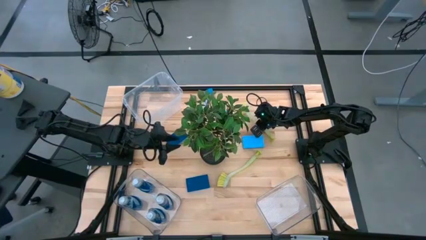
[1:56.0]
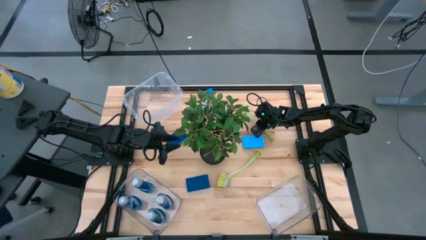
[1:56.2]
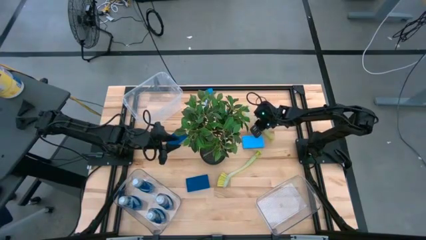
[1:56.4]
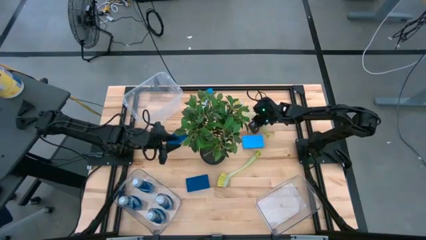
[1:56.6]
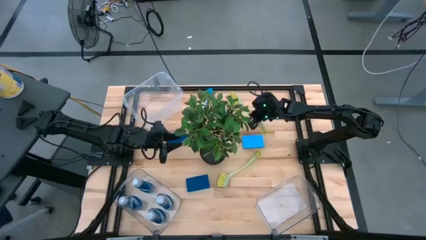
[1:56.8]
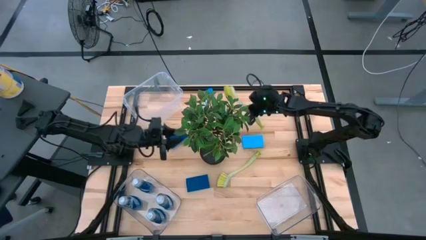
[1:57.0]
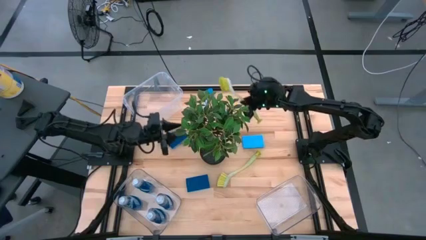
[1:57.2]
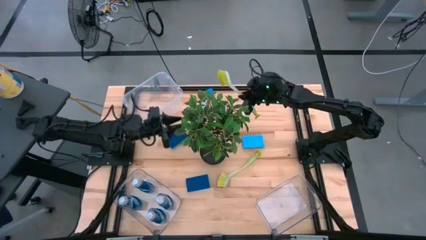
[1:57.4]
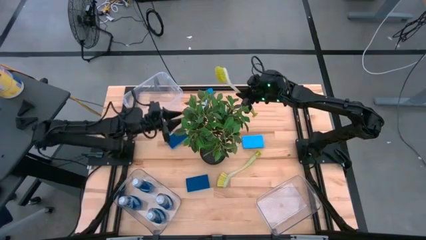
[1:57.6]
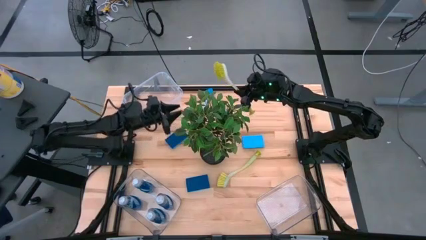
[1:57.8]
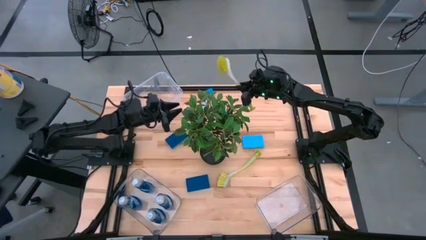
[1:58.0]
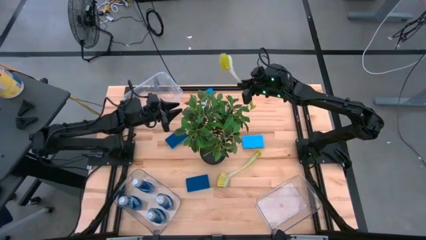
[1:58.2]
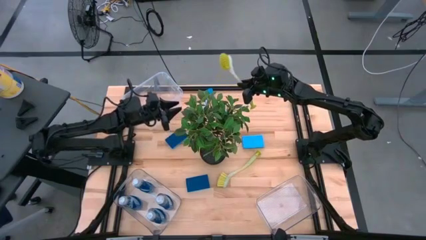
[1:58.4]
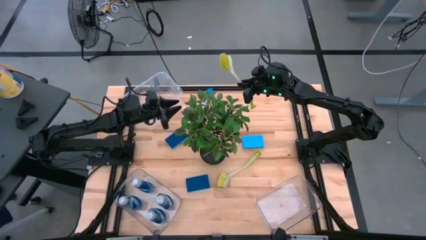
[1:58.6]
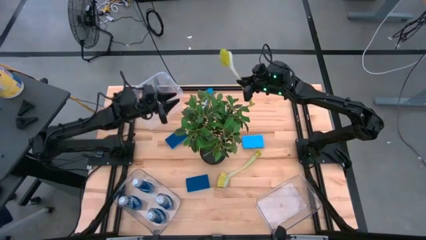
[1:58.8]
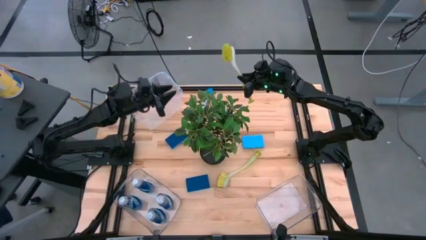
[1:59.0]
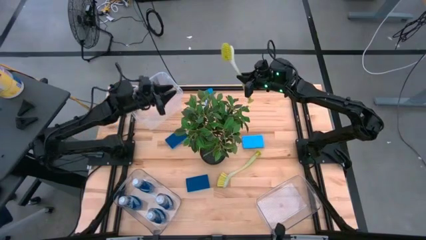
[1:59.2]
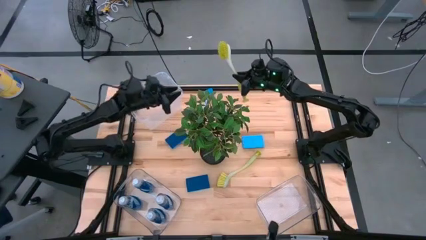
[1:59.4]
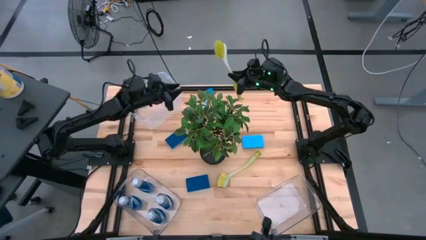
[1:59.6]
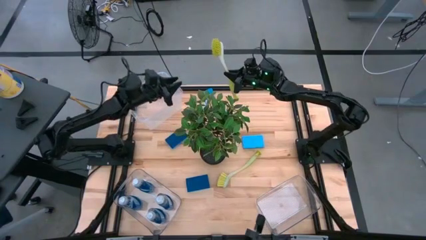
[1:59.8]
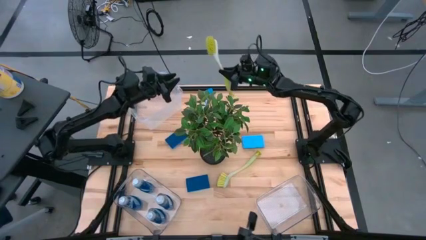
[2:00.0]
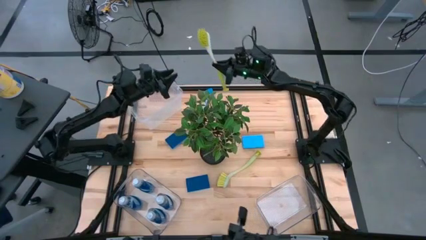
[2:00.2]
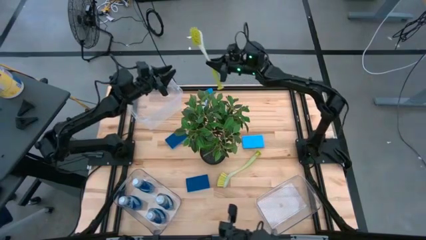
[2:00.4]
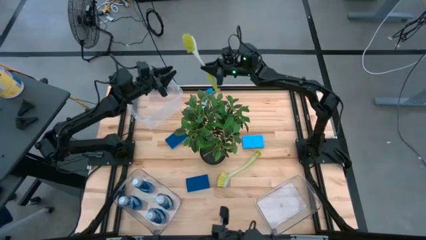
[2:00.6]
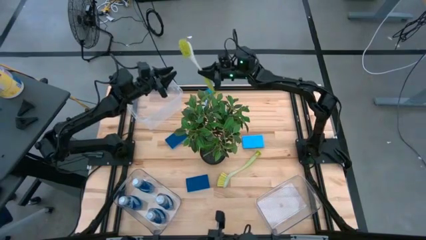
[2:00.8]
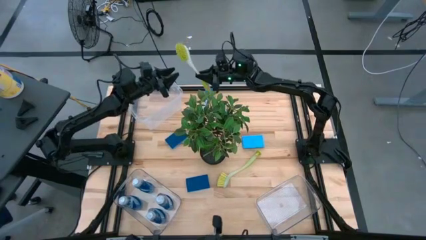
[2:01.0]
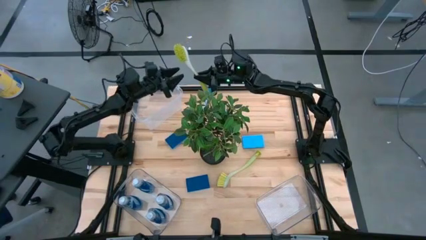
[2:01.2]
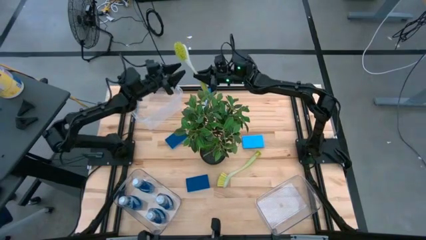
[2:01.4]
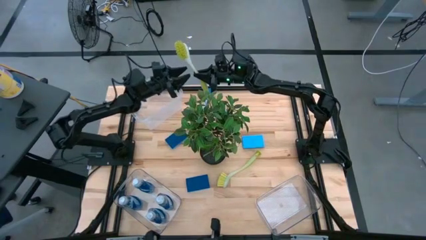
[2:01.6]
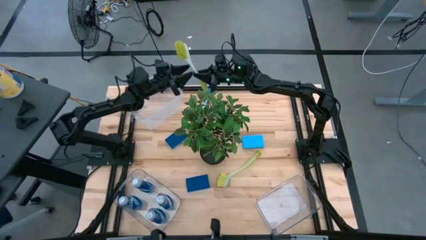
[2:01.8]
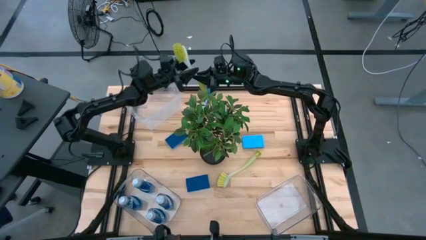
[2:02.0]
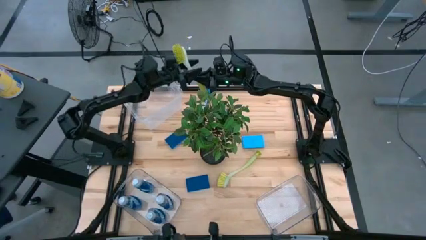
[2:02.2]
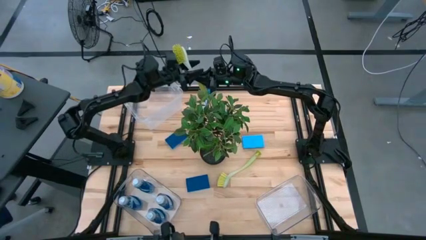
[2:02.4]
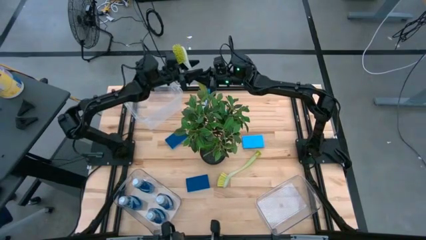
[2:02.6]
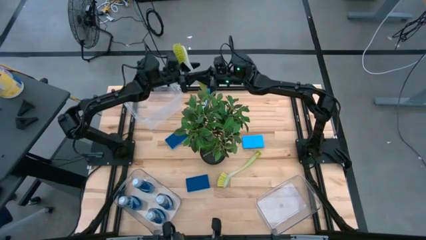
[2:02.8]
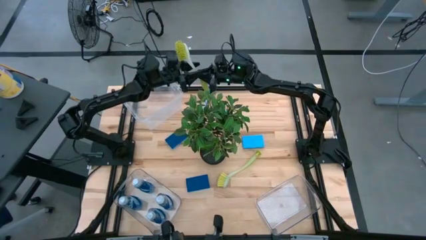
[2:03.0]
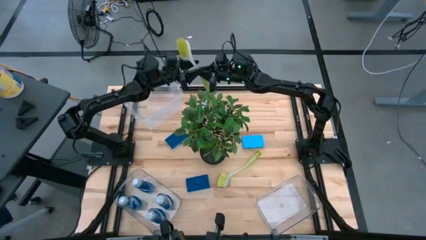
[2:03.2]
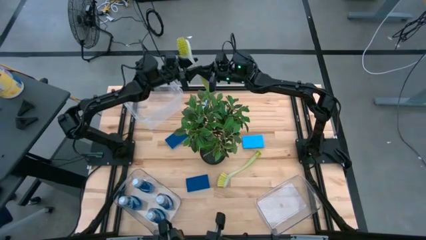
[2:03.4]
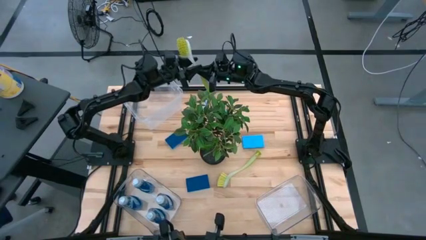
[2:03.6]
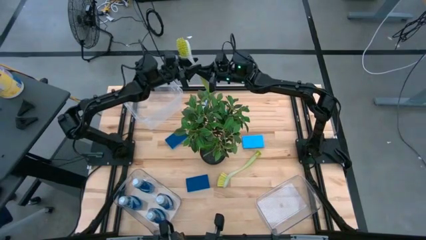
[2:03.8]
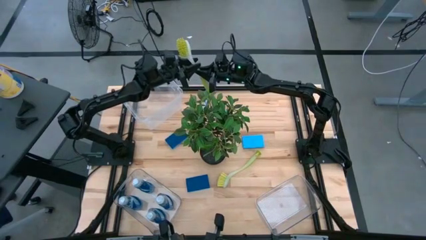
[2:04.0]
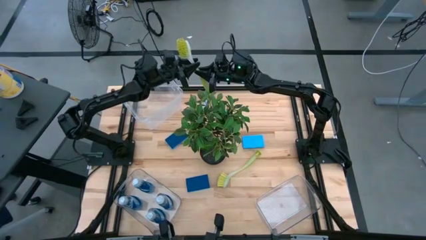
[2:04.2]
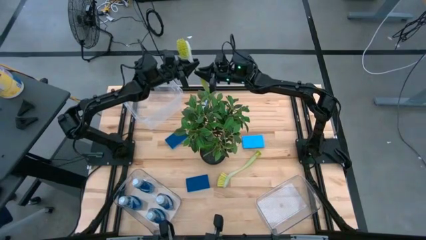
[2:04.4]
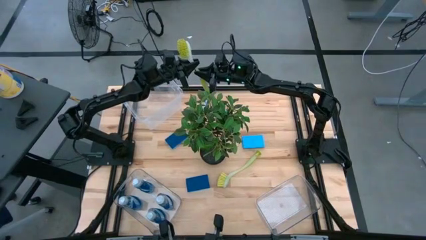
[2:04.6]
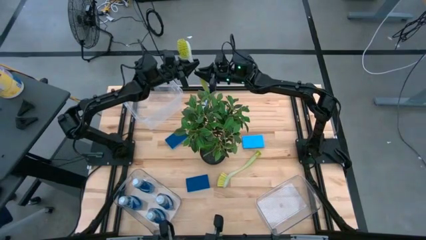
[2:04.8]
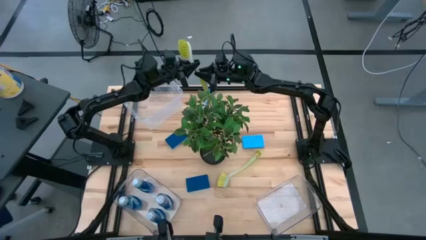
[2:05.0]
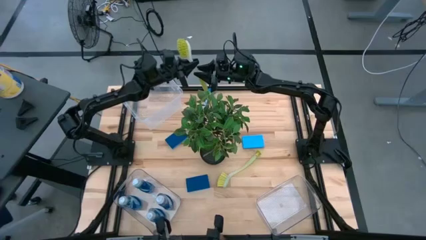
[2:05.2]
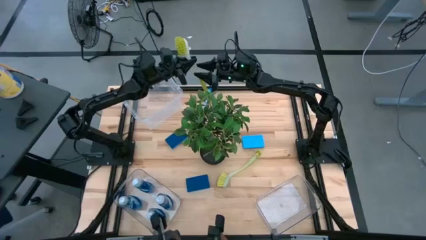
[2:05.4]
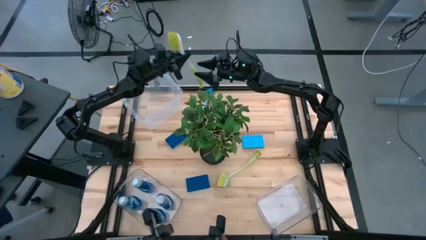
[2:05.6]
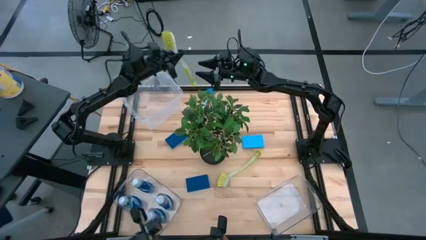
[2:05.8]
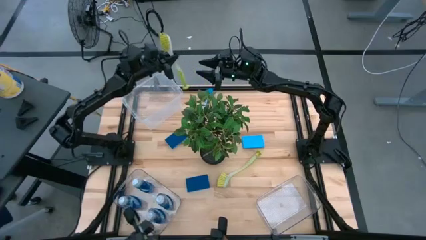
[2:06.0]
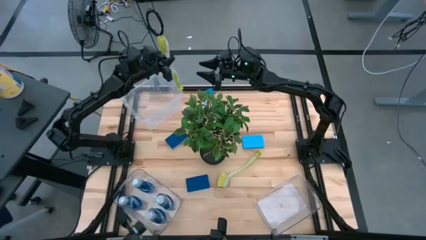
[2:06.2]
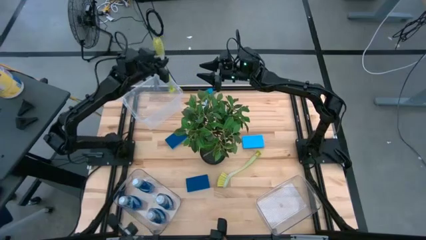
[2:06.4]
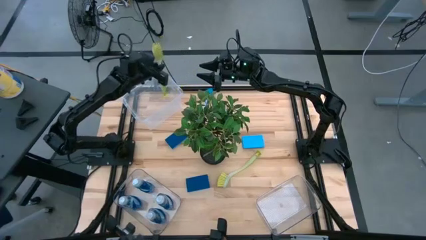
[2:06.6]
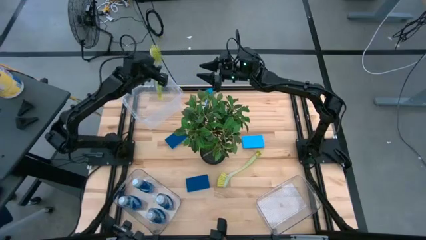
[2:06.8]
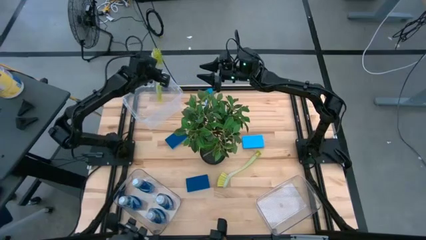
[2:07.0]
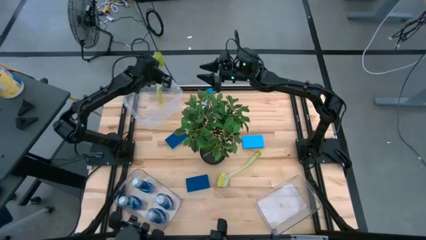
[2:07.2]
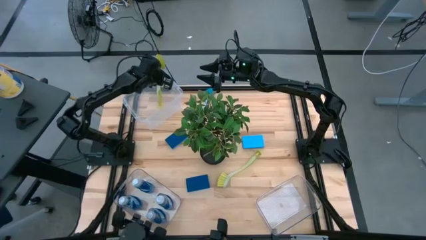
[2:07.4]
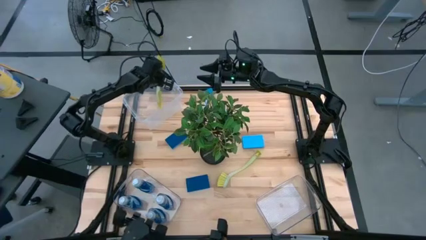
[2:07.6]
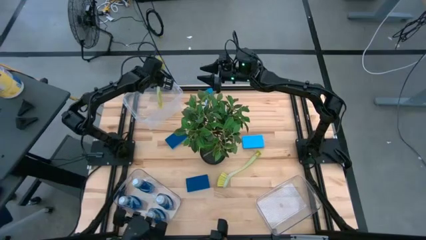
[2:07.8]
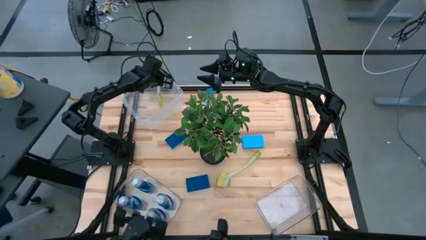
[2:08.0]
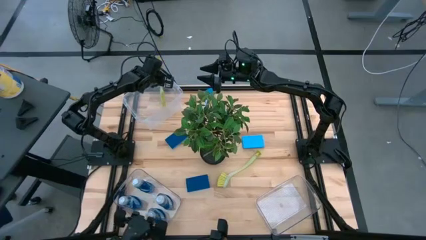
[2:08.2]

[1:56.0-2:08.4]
Task: Pick & Place Kitchen Sink Supplies
Put the green kitchen brush into the top transparent bin

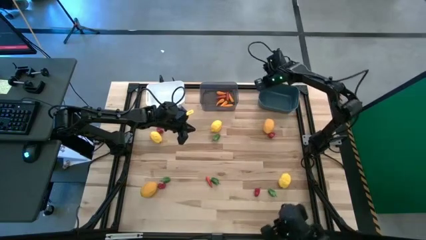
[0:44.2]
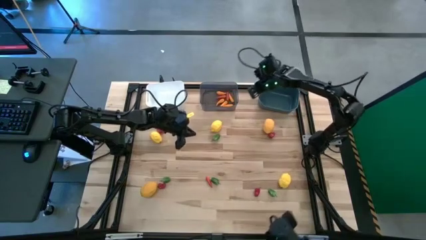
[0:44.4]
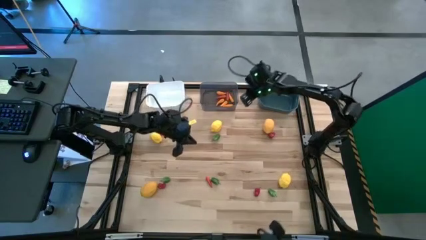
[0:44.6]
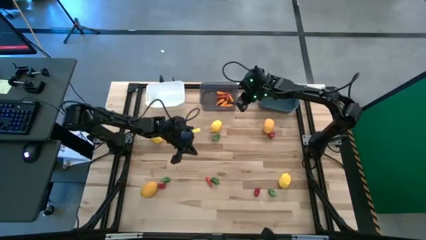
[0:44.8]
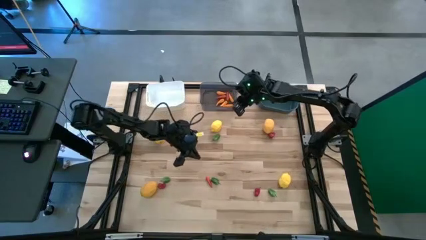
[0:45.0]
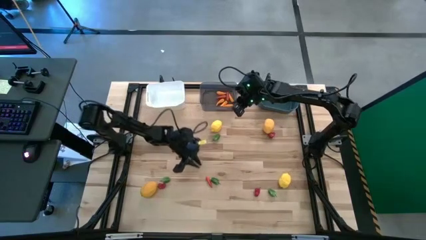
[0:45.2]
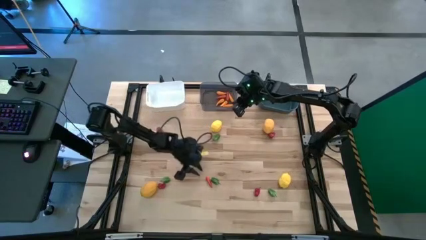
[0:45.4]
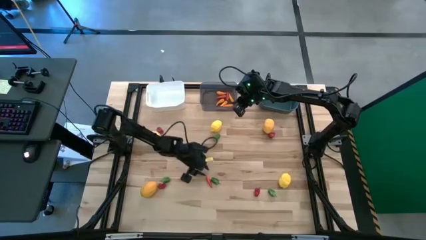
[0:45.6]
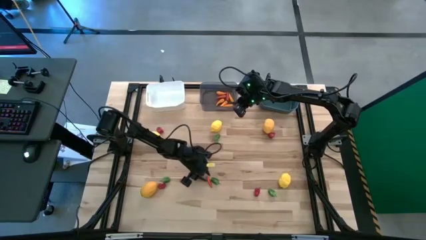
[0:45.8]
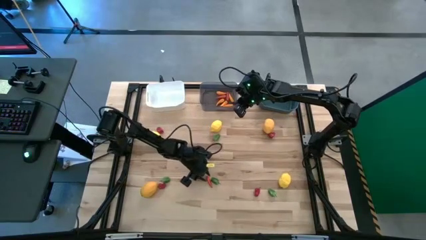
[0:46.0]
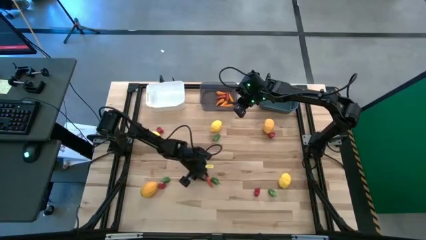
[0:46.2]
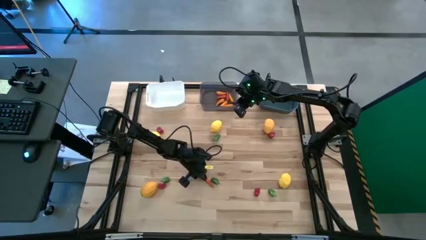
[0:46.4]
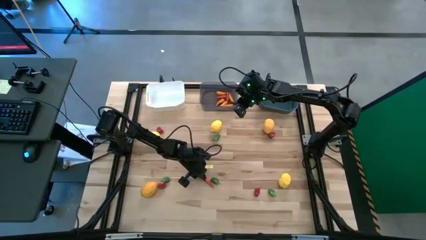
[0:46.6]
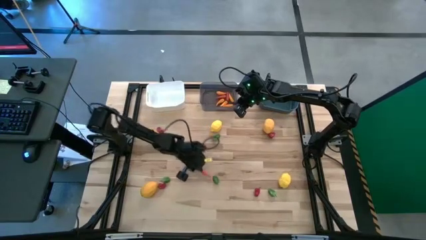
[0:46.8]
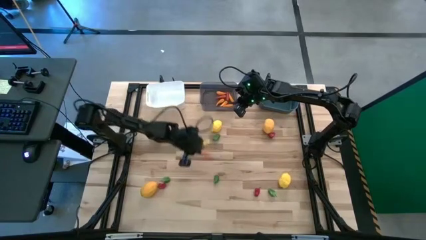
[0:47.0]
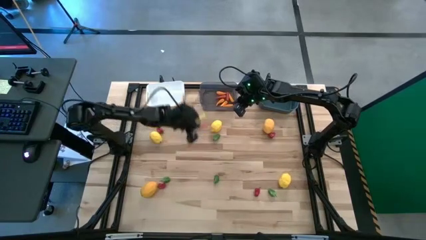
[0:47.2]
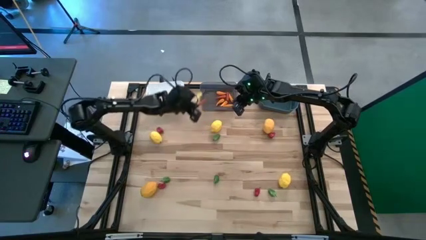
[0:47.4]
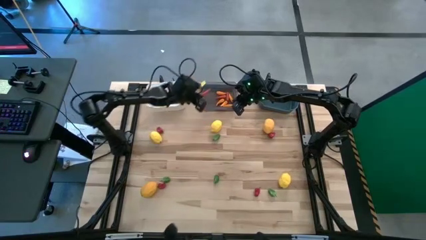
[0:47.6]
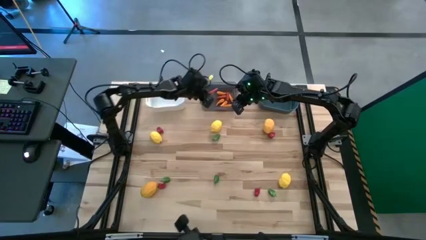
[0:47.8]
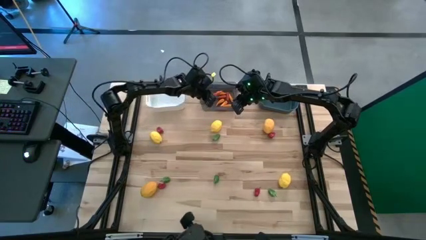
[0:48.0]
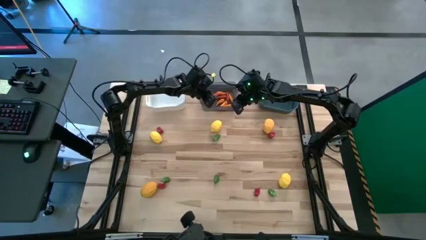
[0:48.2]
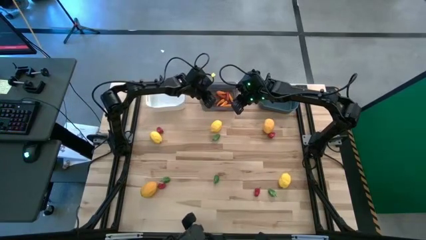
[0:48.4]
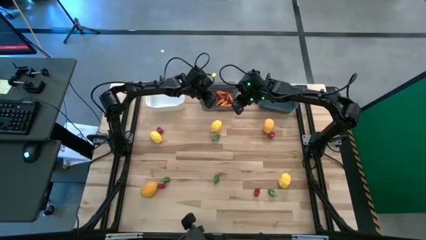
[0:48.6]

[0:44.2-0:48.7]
Task: Sort produce into baskets
Put the orange chili pepper into the black bin
